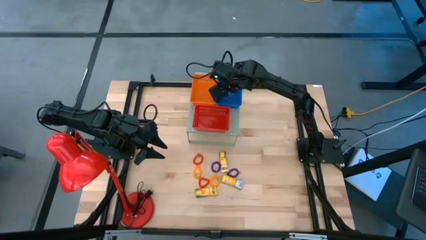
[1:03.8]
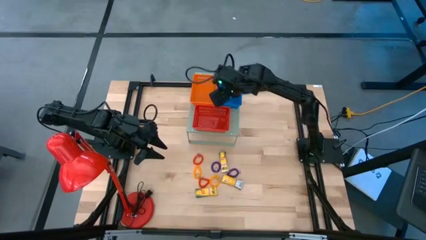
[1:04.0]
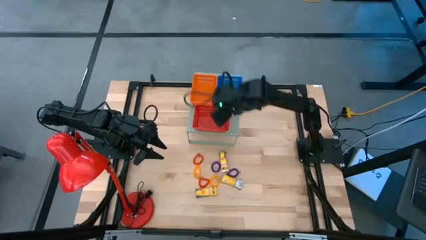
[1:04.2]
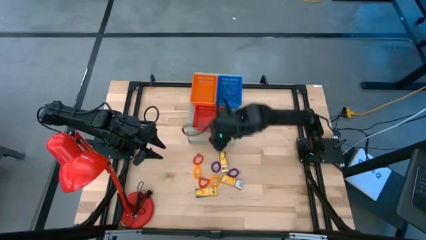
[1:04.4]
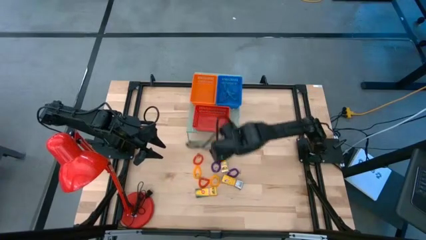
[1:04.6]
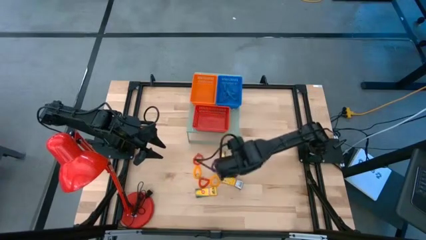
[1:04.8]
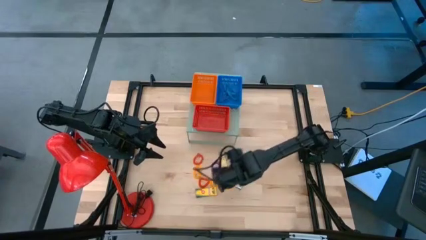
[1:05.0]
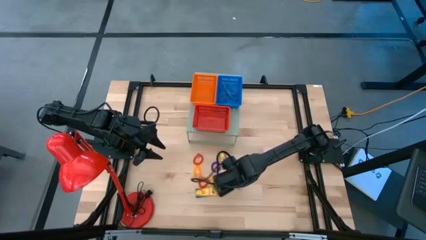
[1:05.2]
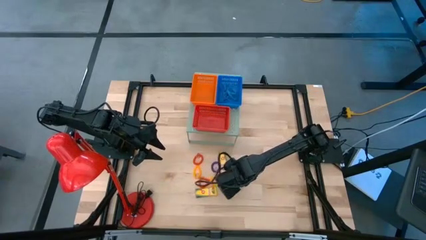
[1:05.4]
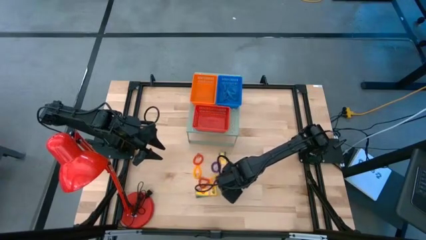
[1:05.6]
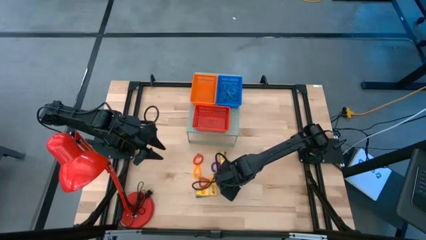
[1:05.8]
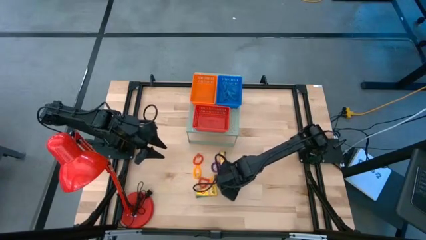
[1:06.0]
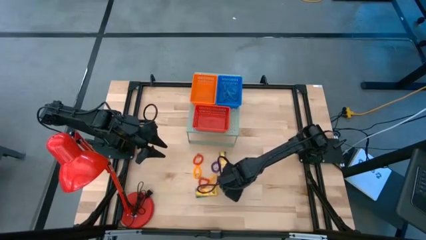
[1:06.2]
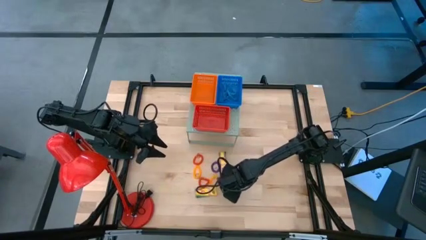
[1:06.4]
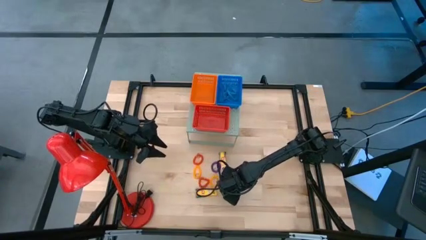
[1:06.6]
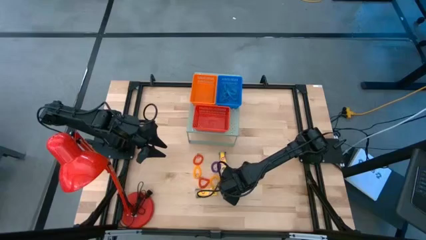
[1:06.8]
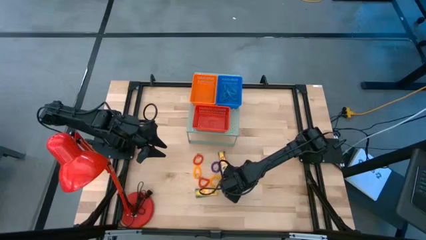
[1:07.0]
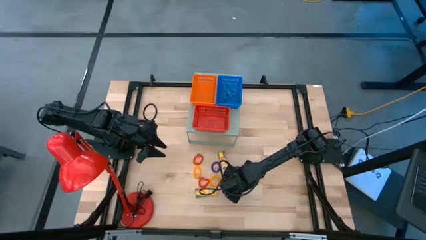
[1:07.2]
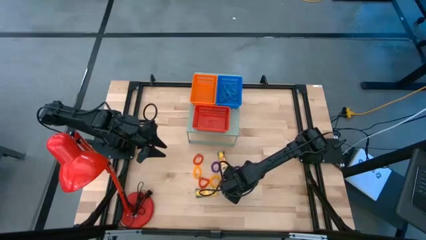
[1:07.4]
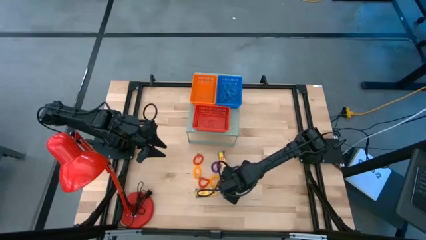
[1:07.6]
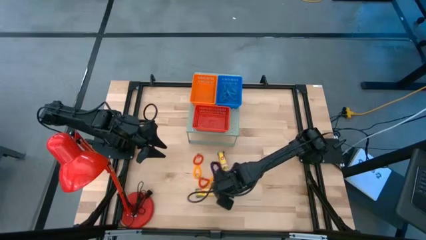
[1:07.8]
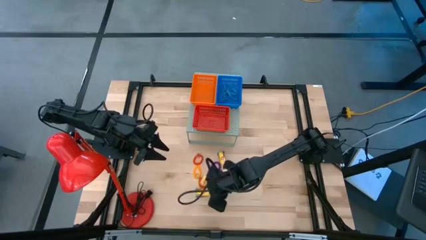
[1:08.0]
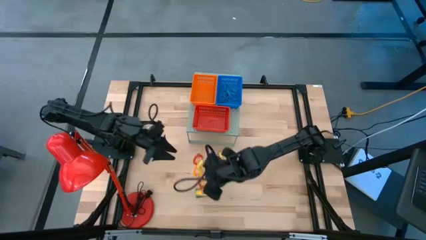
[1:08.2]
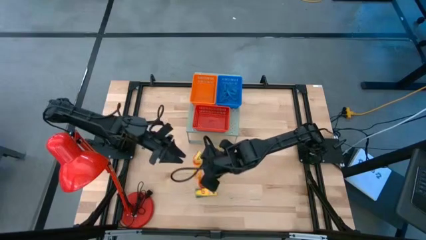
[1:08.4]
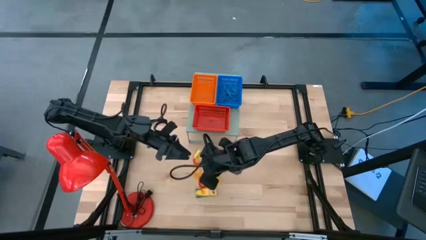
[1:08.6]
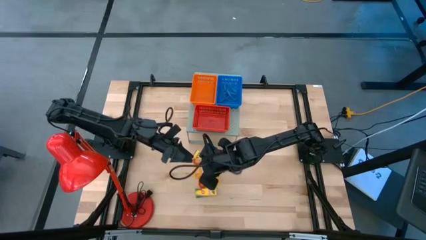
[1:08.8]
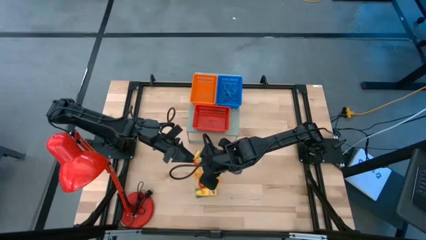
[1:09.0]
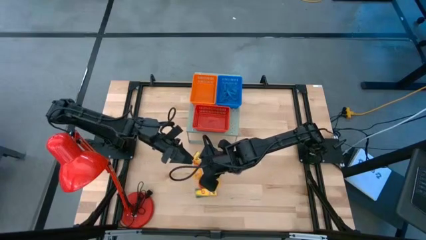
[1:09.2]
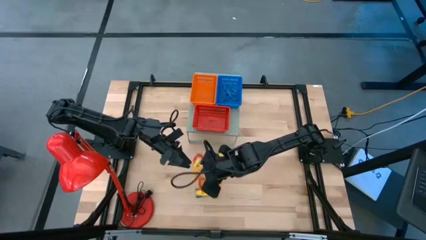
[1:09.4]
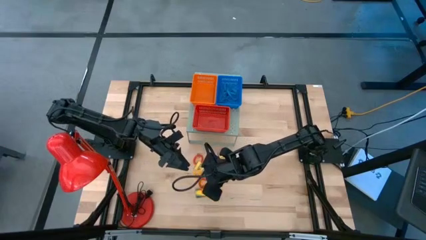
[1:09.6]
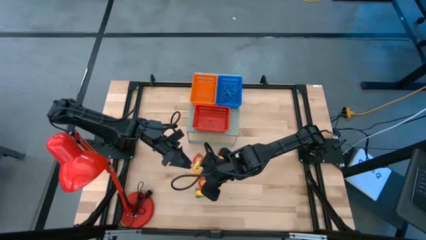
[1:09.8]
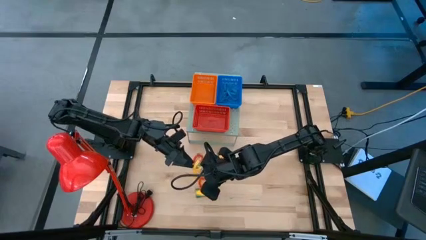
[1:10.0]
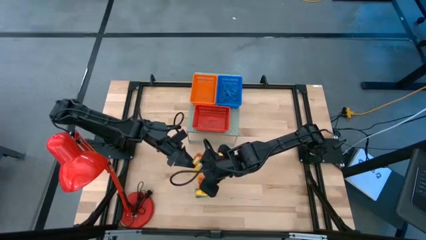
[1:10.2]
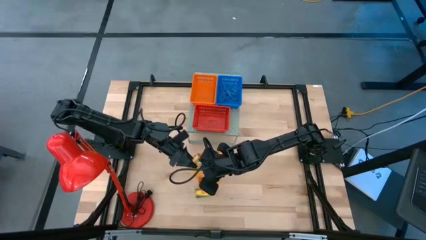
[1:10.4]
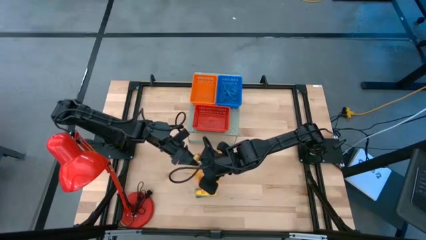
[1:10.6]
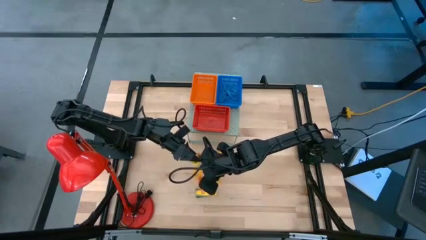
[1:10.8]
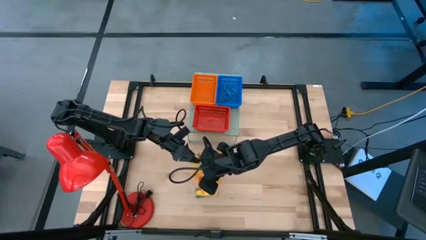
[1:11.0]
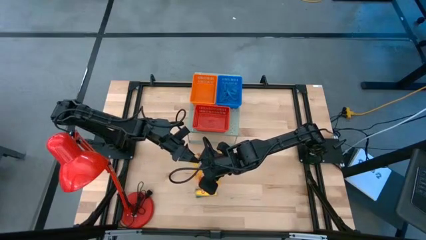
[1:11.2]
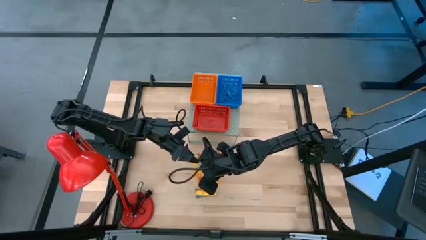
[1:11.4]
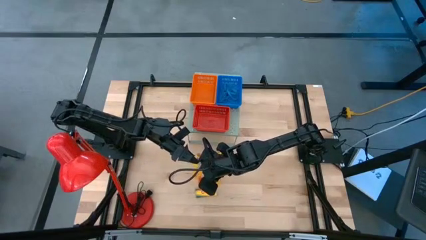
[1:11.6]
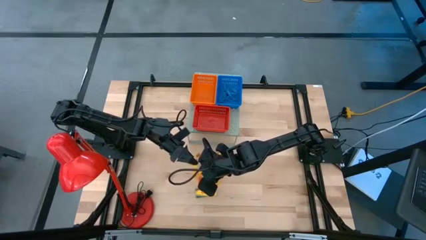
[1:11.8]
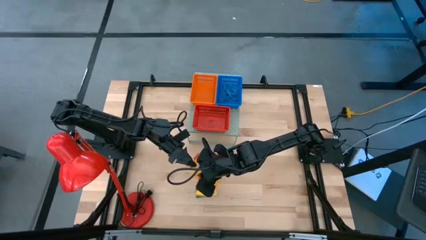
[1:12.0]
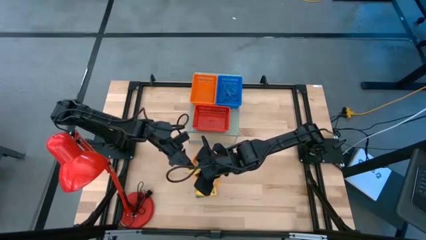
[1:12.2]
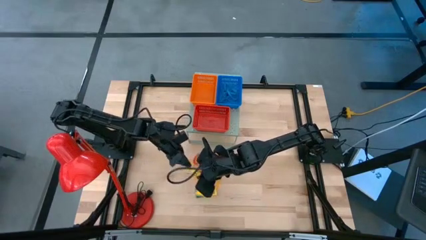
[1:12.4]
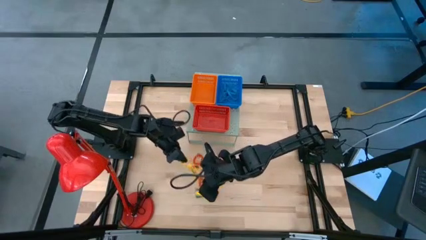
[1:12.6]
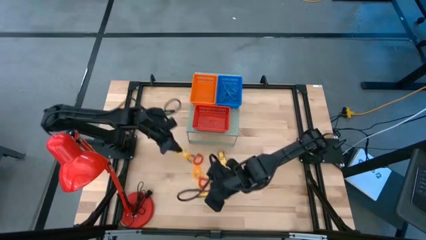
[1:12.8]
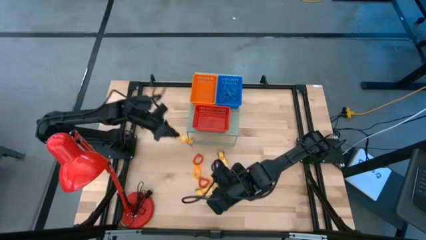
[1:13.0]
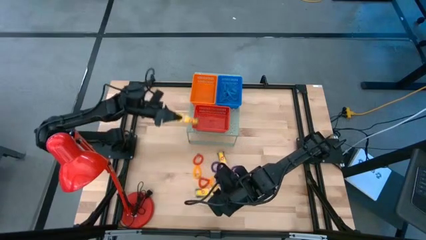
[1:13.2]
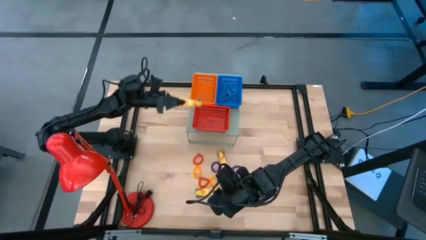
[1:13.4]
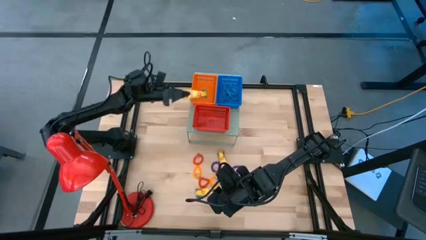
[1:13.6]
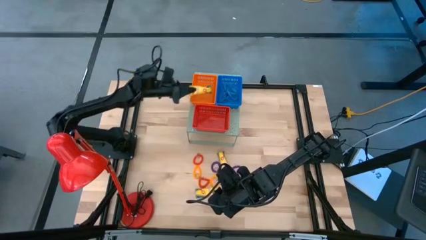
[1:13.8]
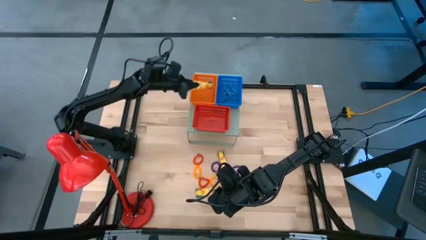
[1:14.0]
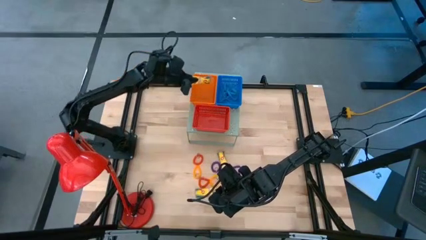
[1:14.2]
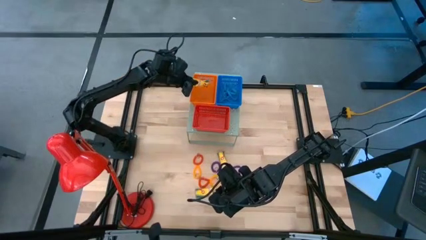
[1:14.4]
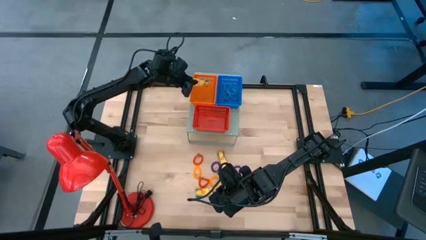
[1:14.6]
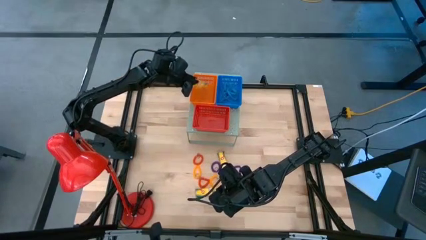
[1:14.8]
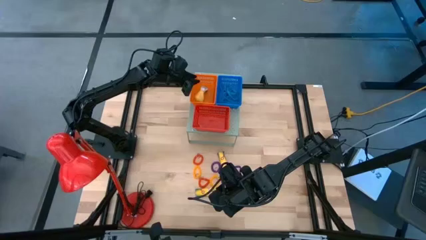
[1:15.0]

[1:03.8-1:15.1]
Task: Pick & Place Office Desk Supplies
Put the yellow crayon box into the orange bin
